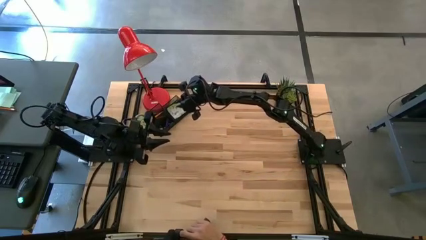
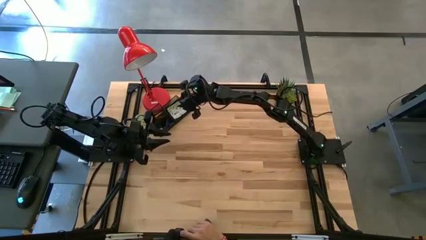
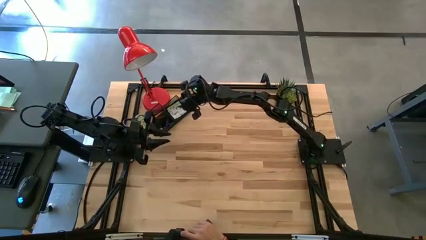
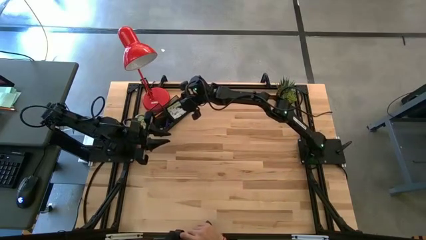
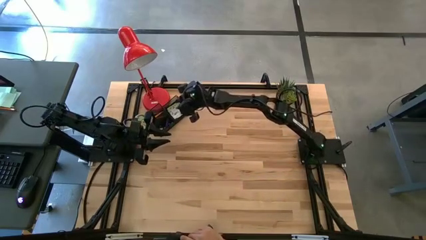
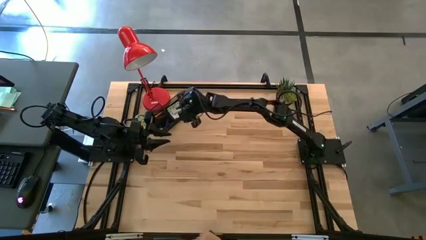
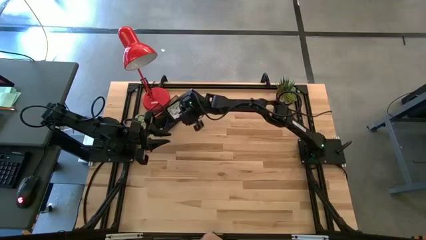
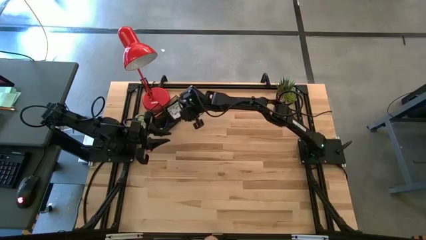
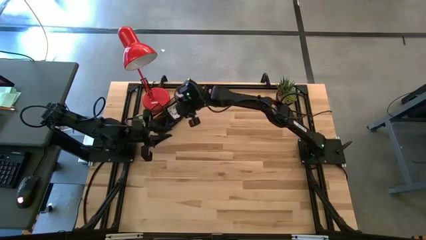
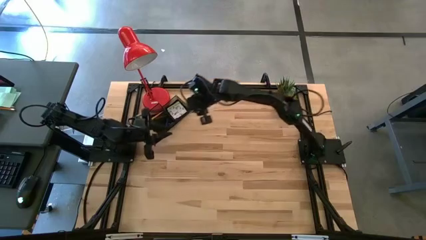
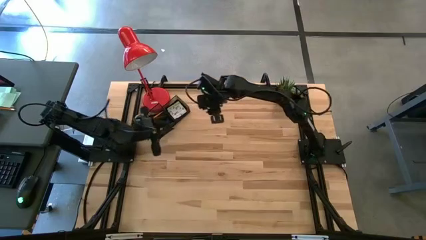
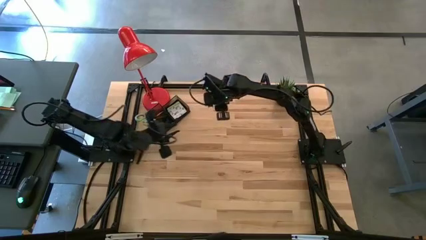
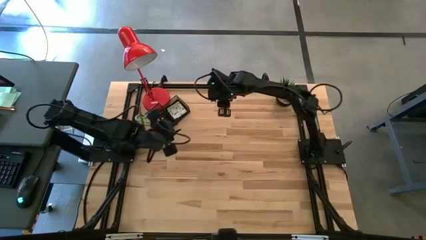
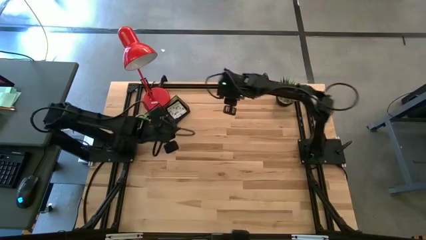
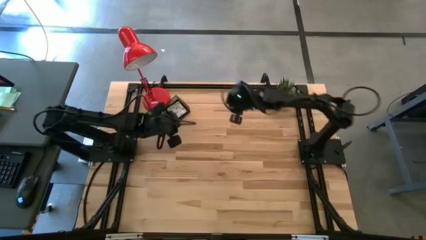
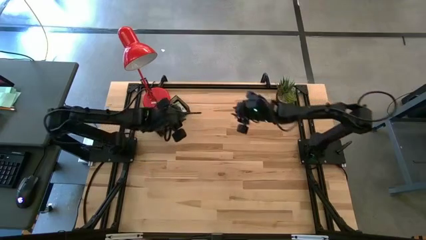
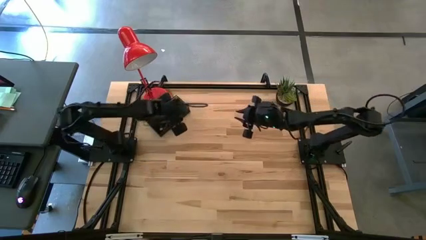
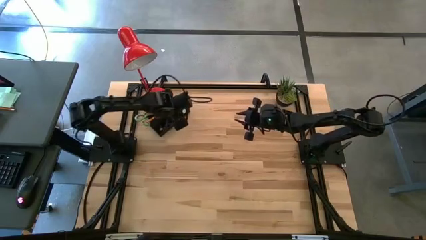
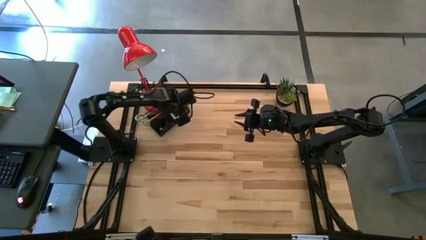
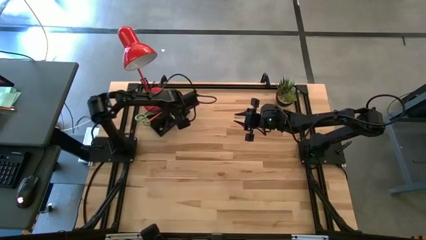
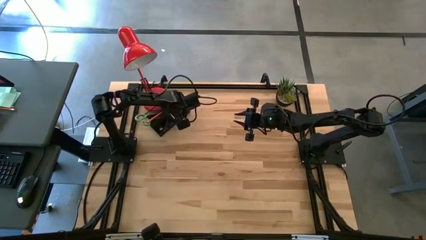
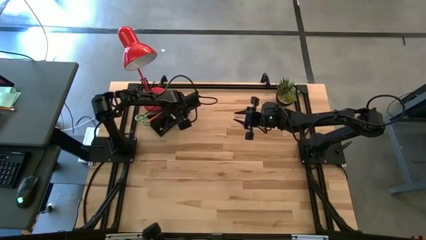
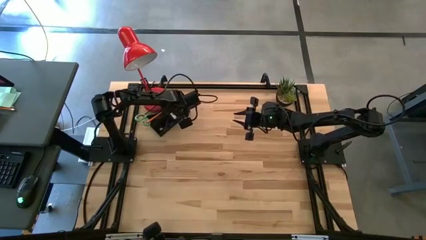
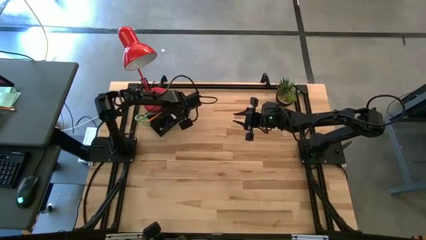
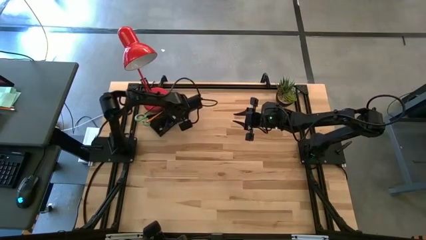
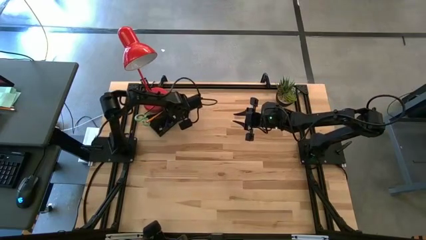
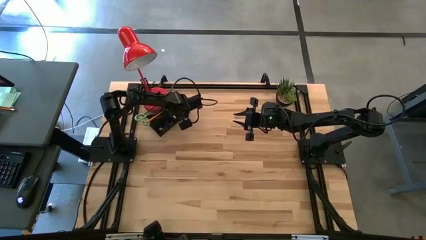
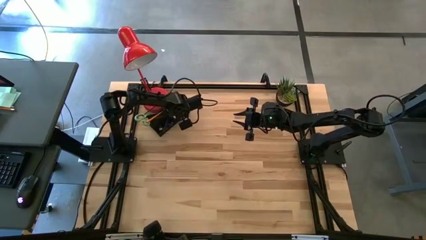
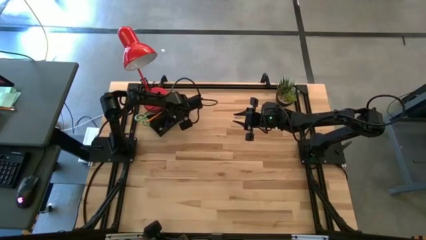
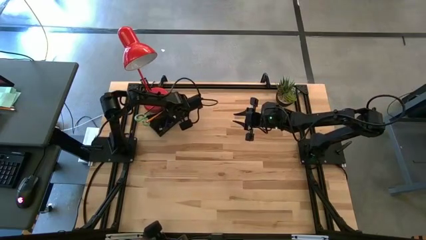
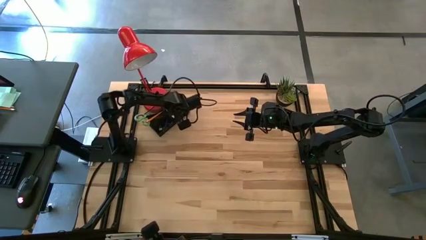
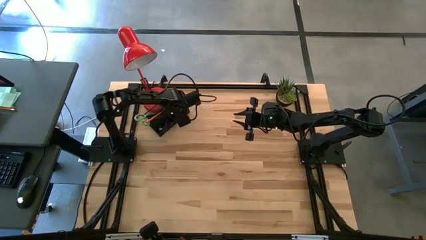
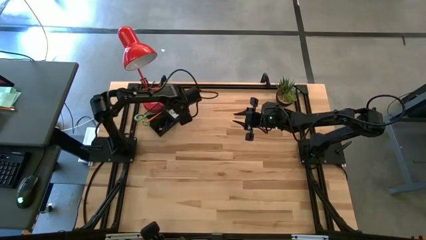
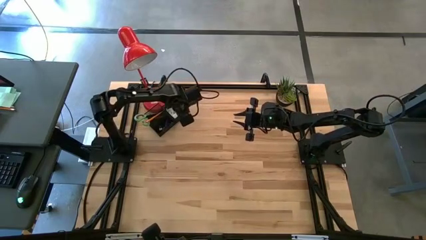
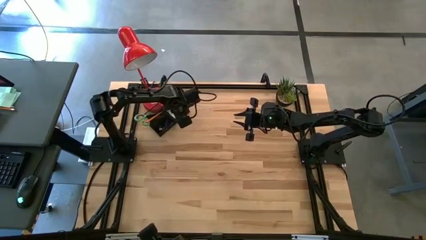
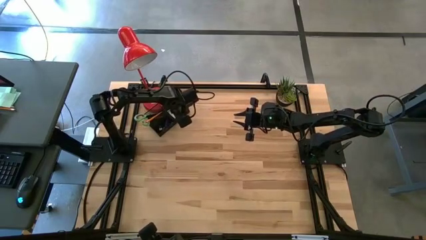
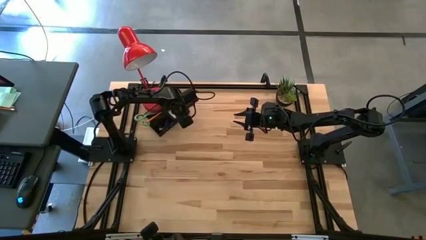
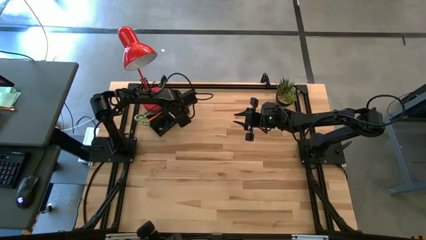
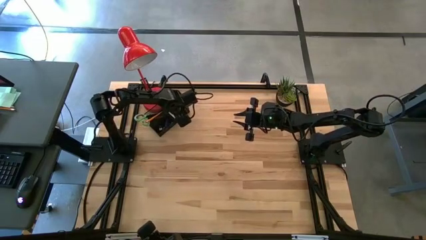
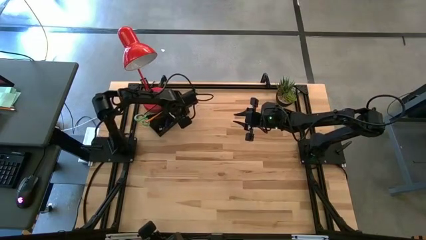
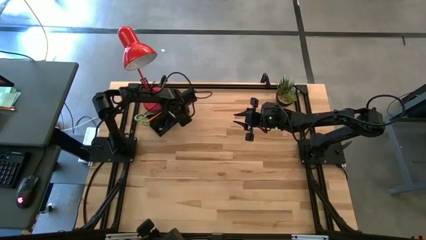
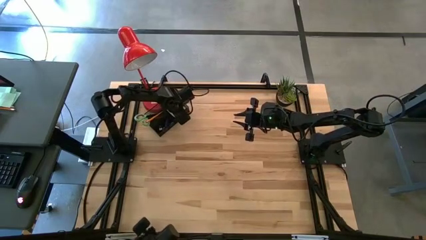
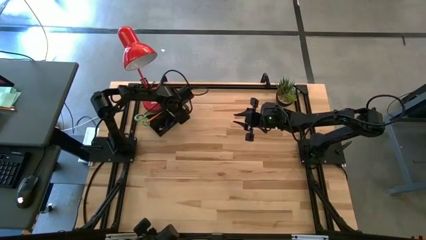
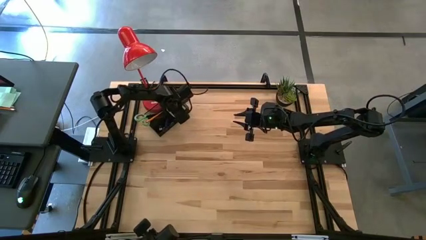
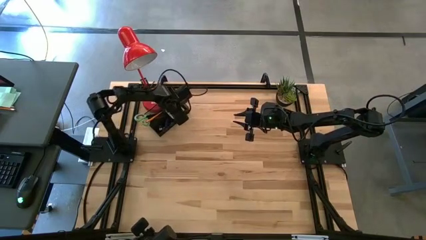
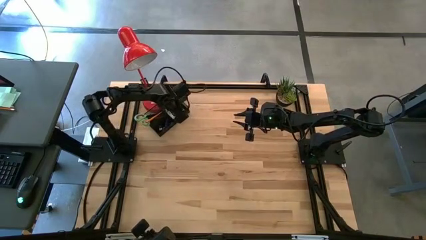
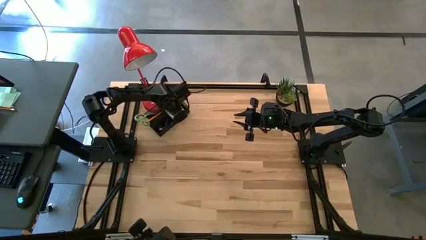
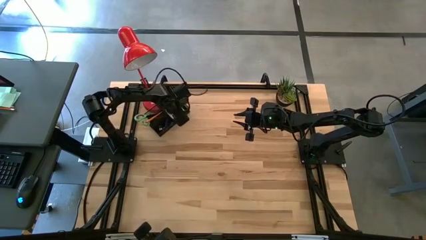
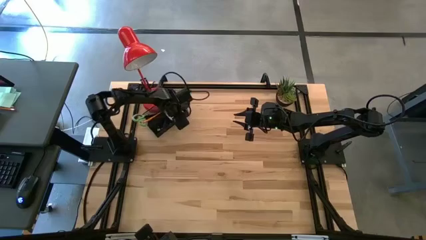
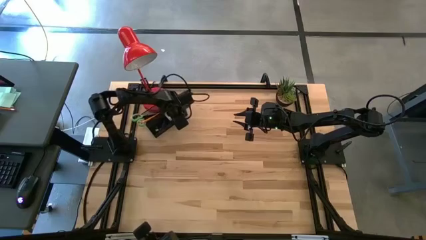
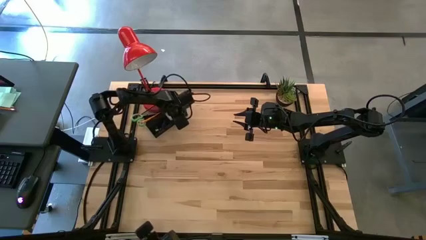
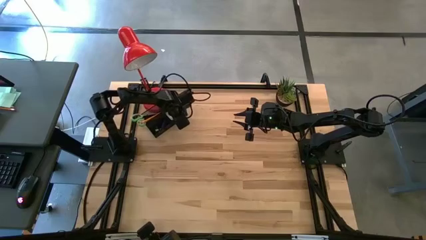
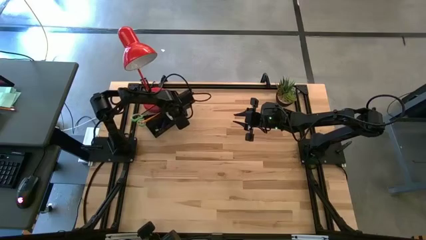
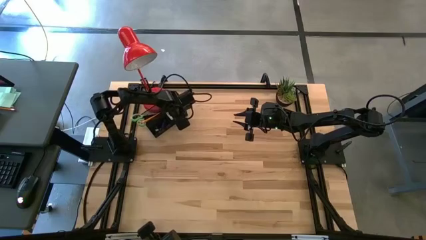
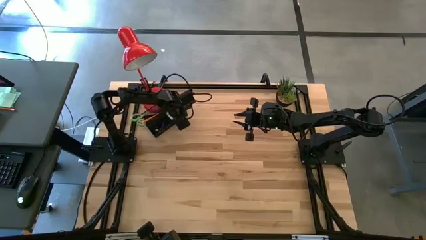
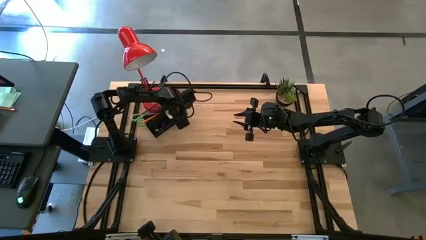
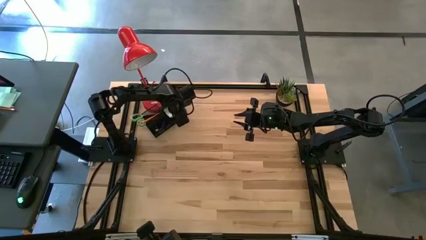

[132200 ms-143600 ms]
Task: Pick and place office supplies into organizer
Adjust the green sticky notes in the desk organizer

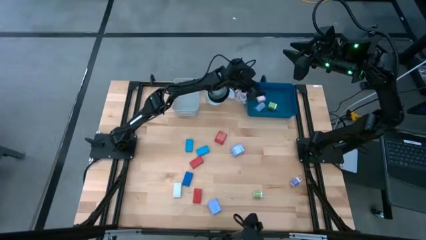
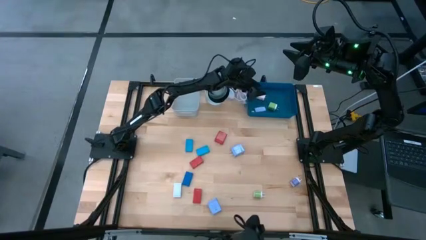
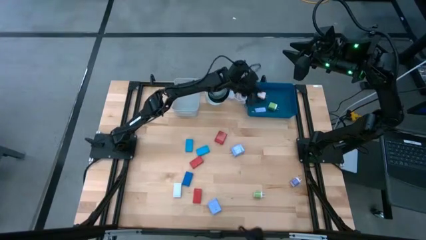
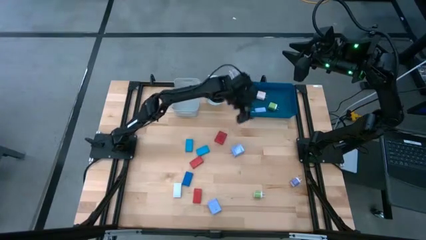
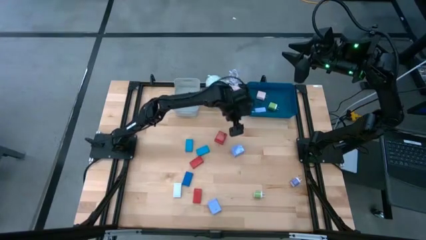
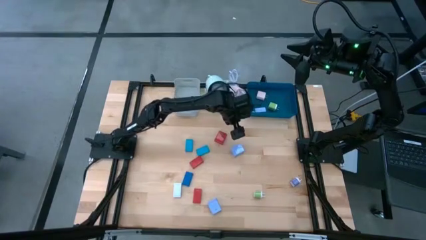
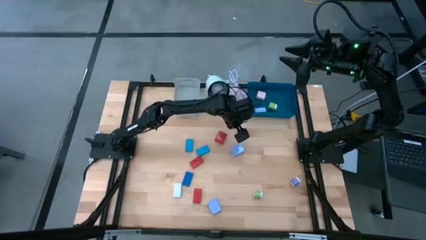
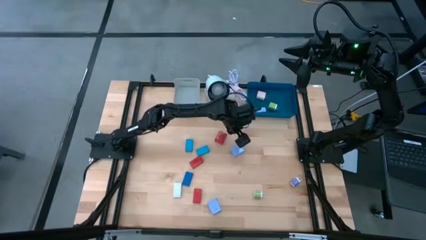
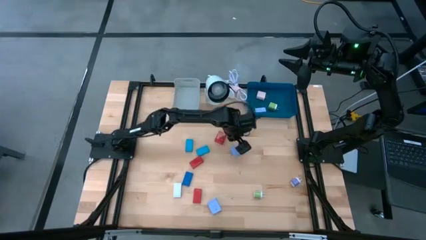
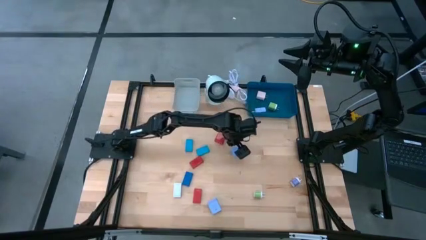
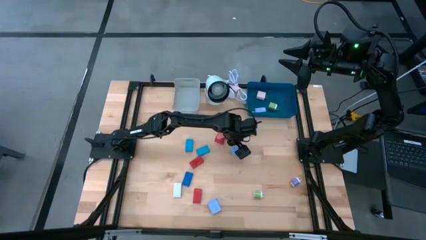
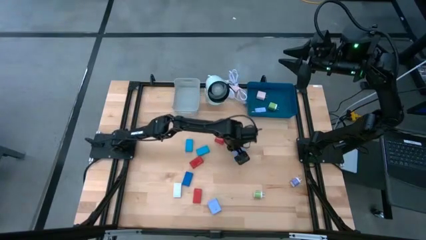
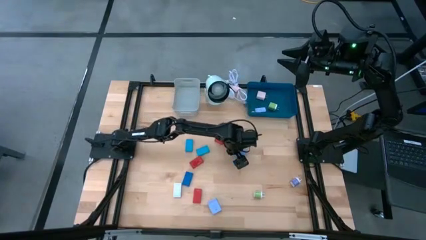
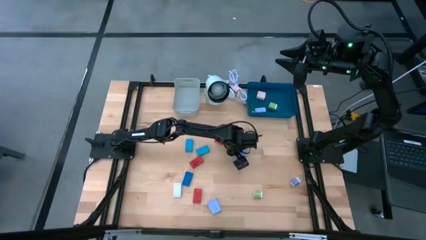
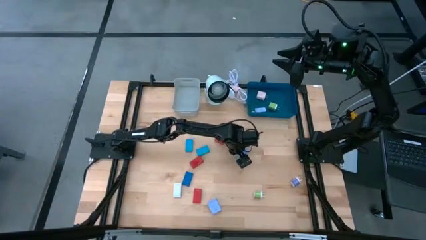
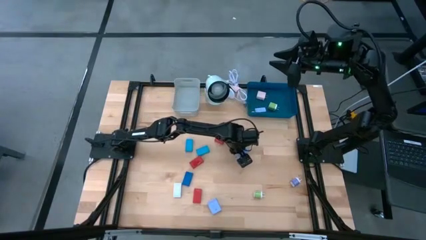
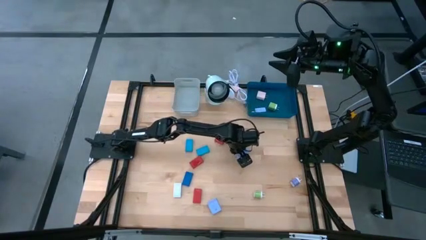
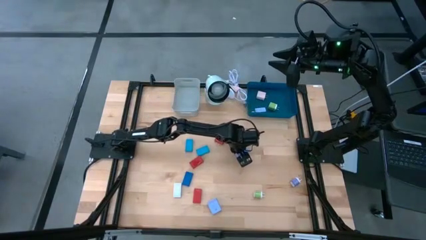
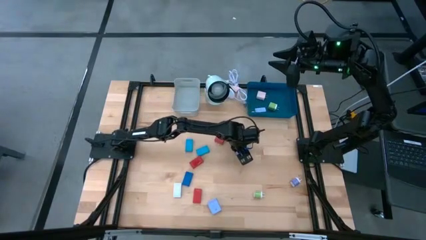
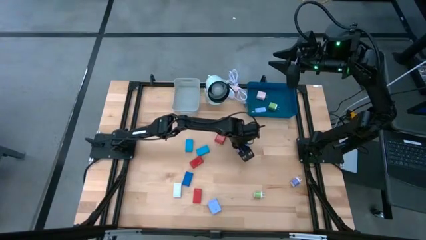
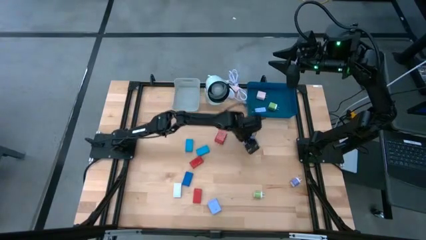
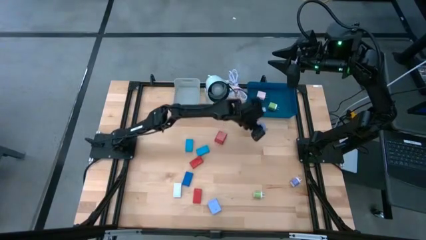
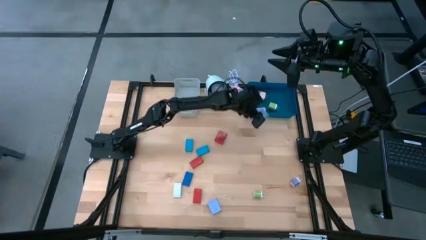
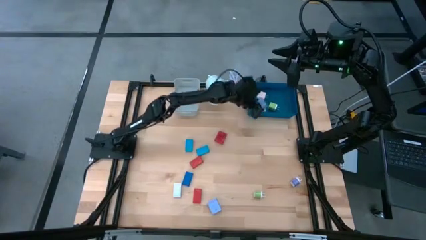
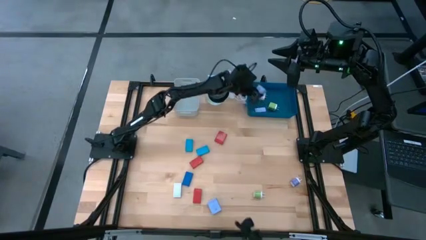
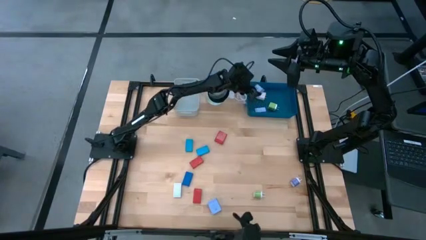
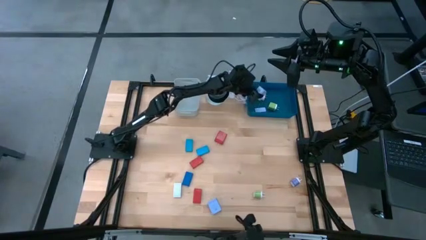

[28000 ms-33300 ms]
Task: Pick & Place Office items
Put the top light purple charger adapter into the blue bin
